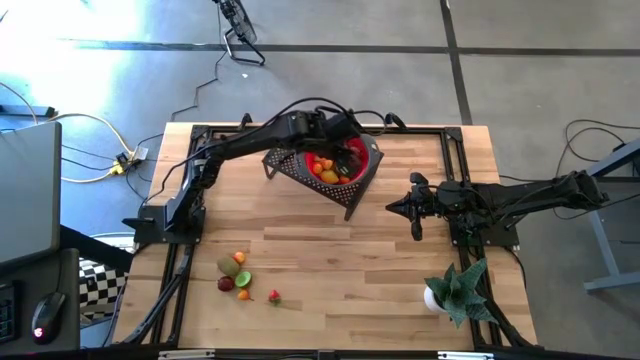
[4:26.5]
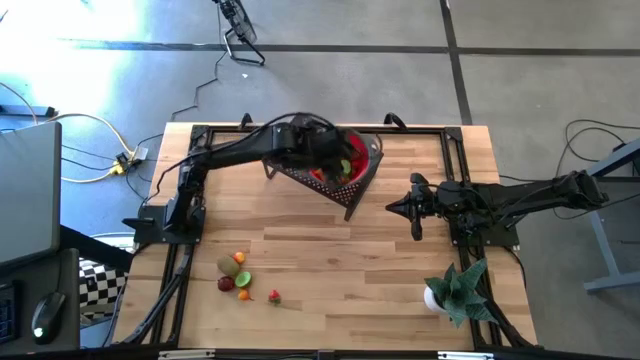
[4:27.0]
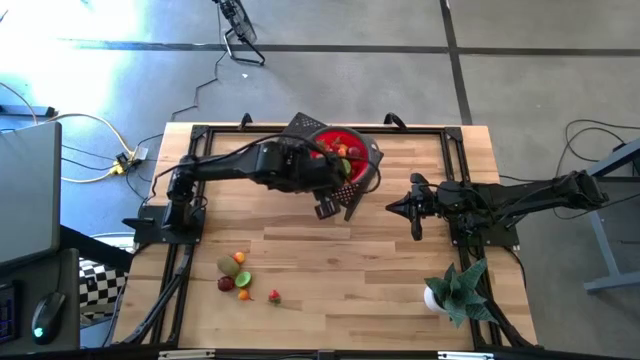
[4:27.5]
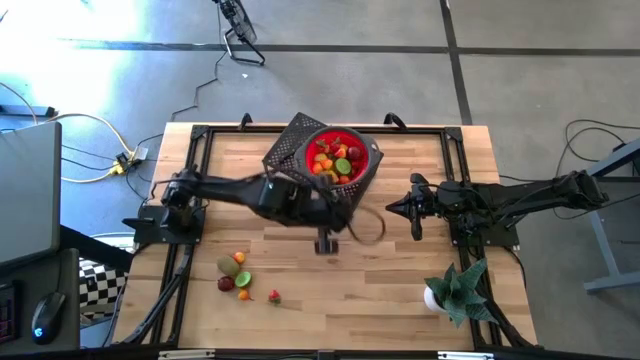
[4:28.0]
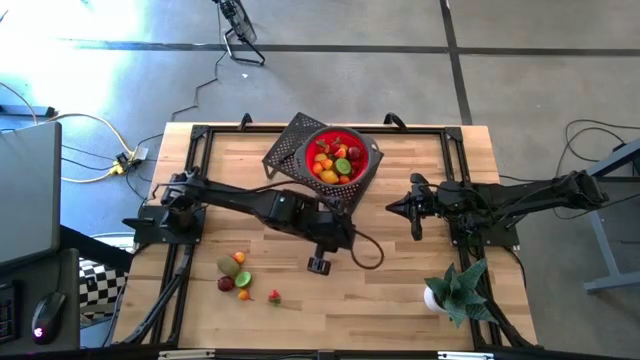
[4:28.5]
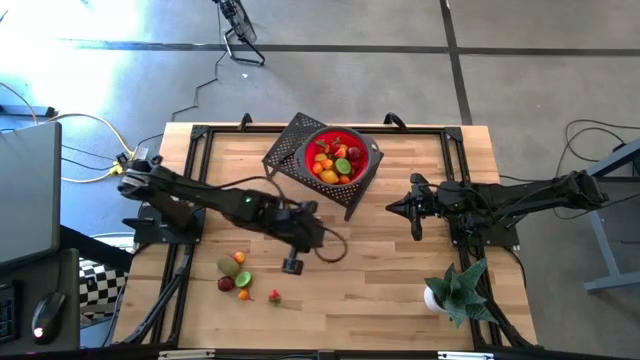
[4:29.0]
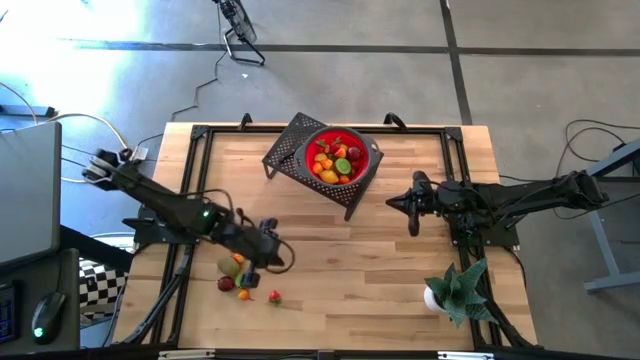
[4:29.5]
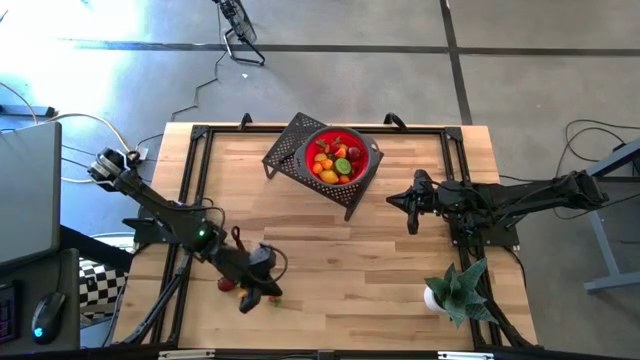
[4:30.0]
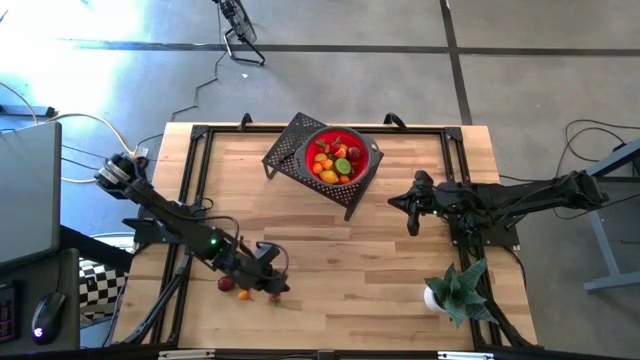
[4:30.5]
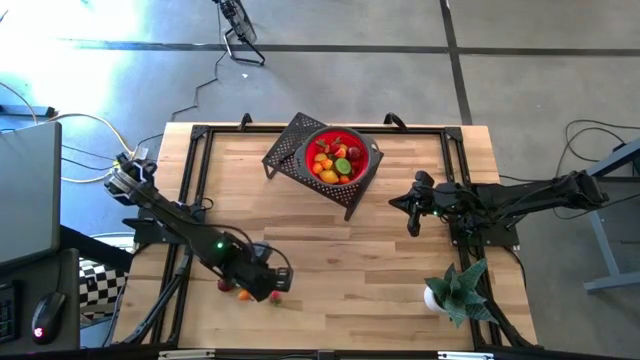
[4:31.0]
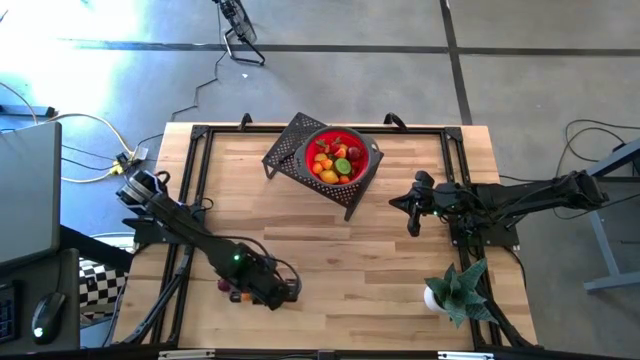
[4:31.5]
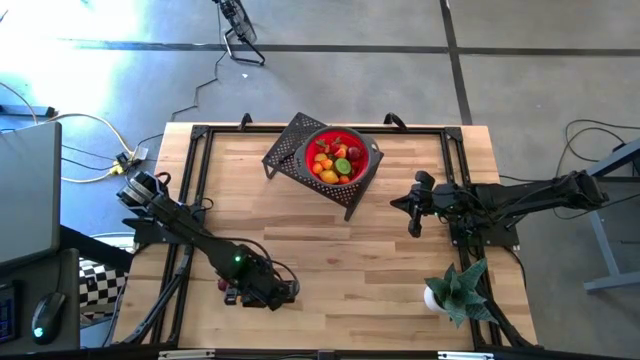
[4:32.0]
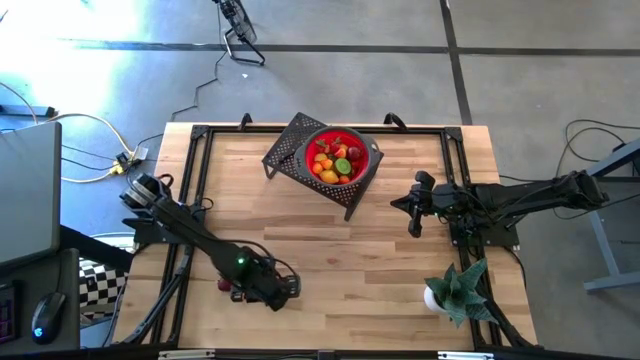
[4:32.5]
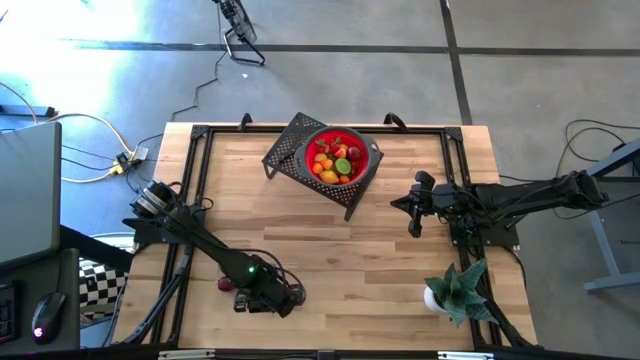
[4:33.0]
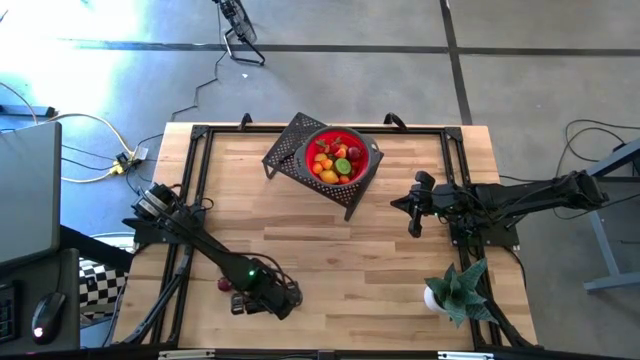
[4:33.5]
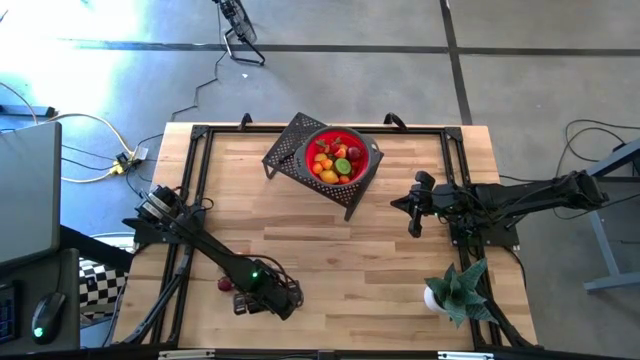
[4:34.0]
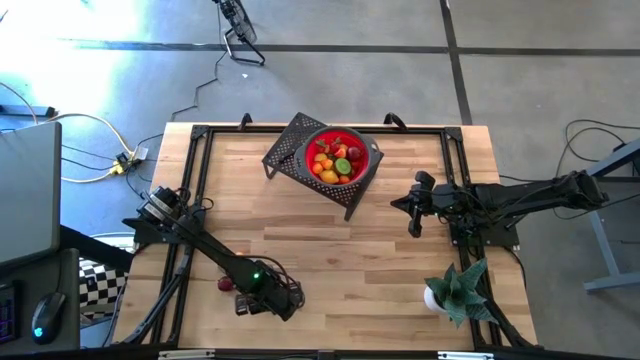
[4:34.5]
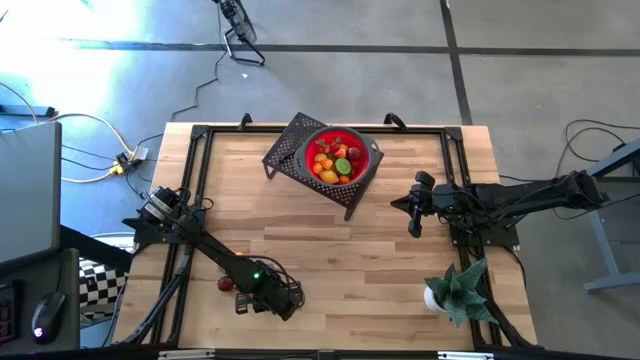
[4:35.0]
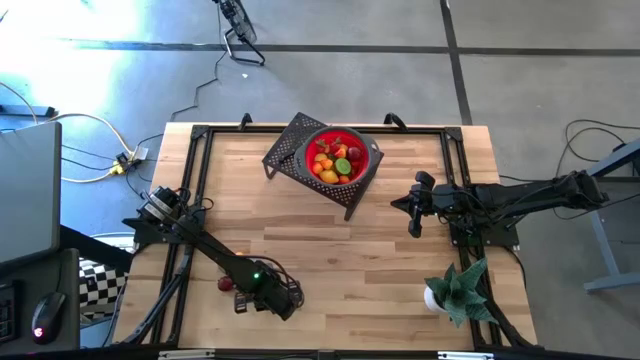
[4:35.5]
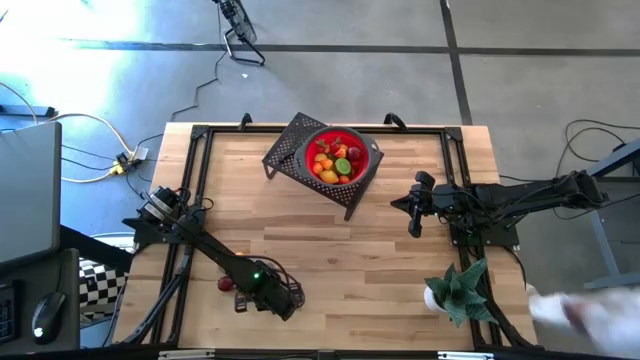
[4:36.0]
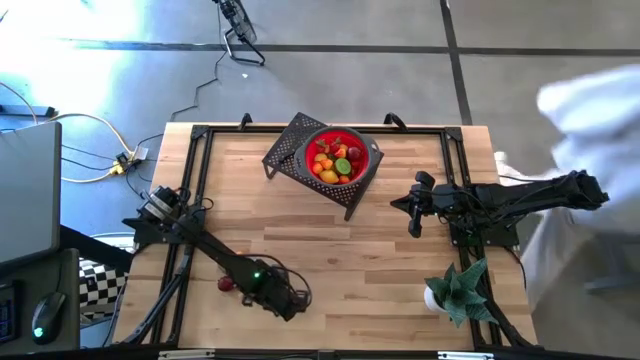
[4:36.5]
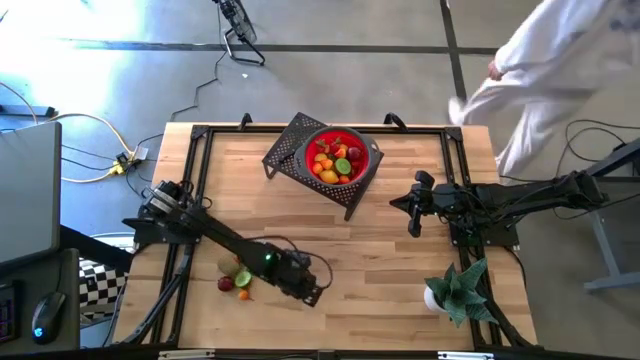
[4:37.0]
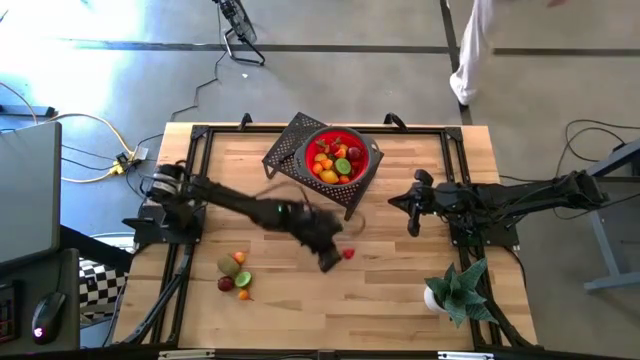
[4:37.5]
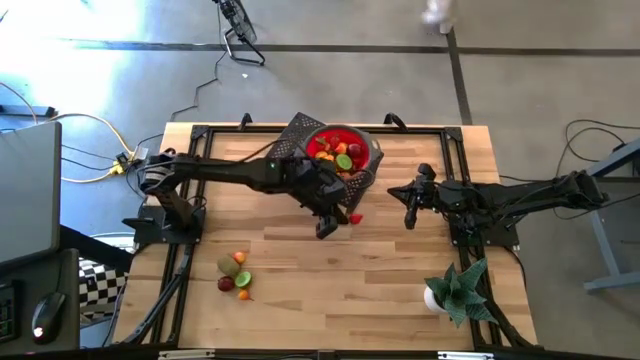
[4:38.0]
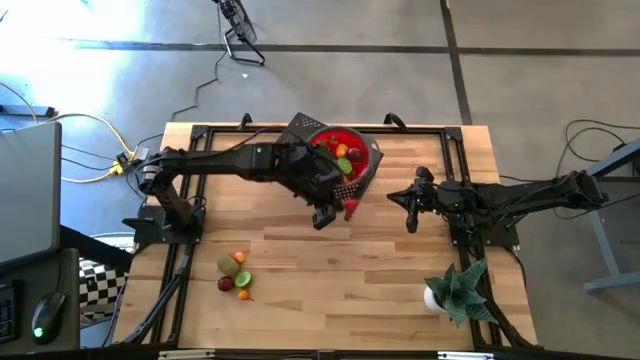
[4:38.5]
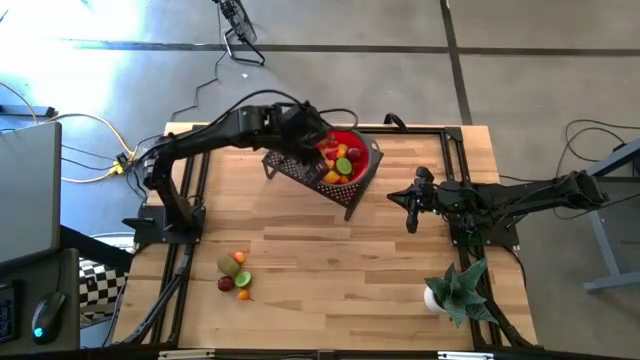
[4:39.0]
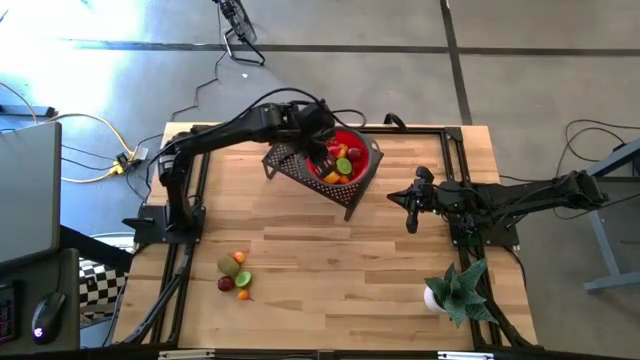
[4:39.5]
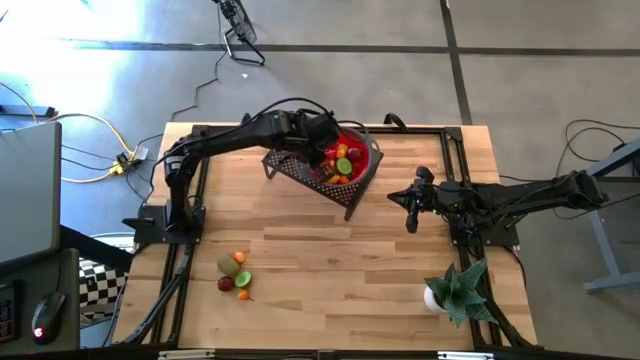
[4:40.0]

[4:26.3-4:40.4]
Task: Pick & Place Fruit
Put the strawberry into the strainer bowl on the shelf

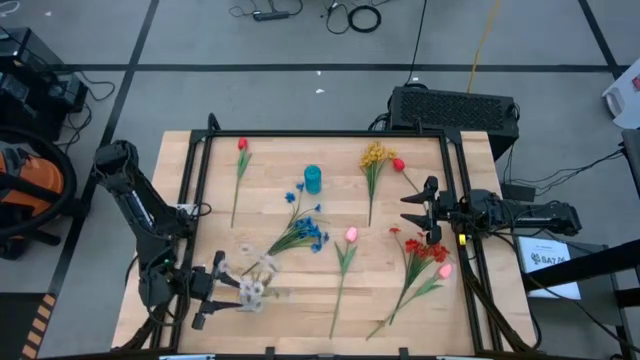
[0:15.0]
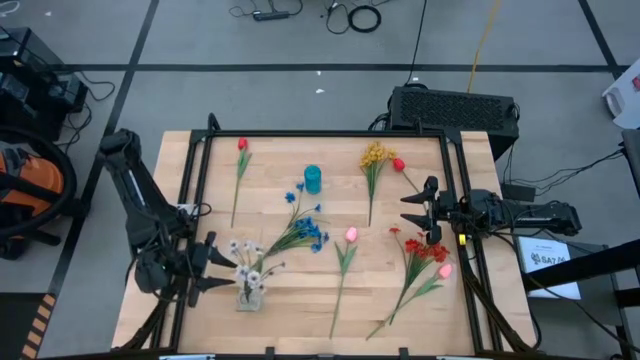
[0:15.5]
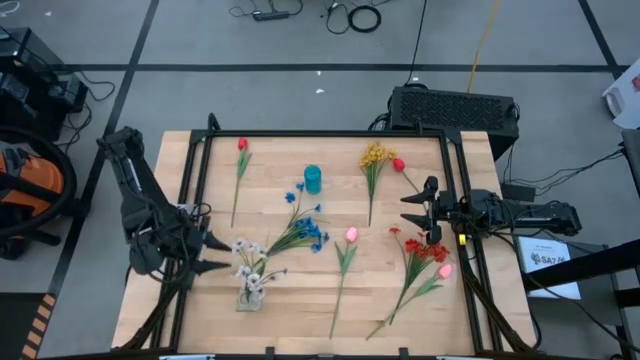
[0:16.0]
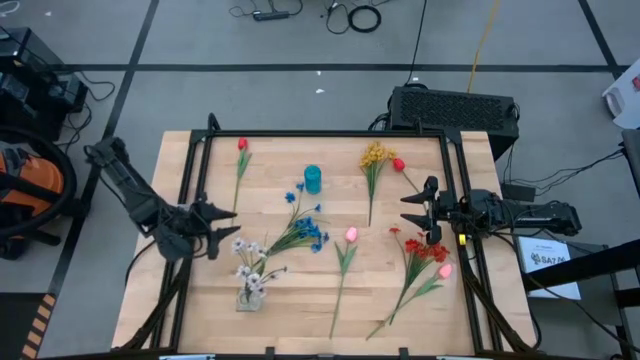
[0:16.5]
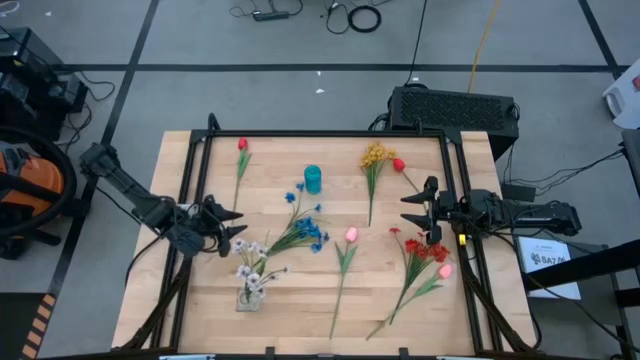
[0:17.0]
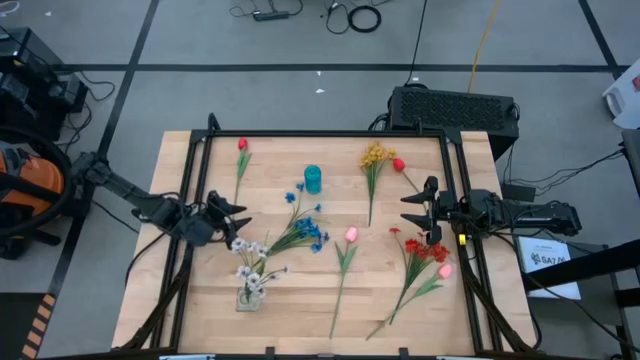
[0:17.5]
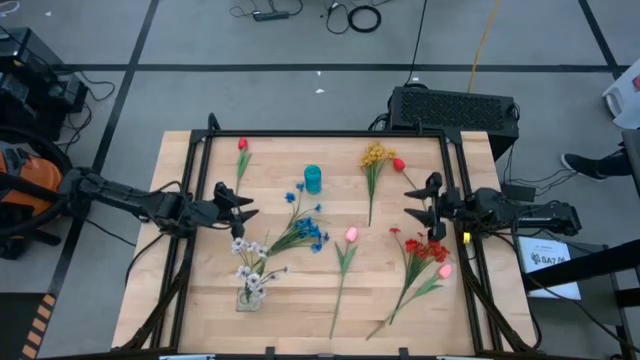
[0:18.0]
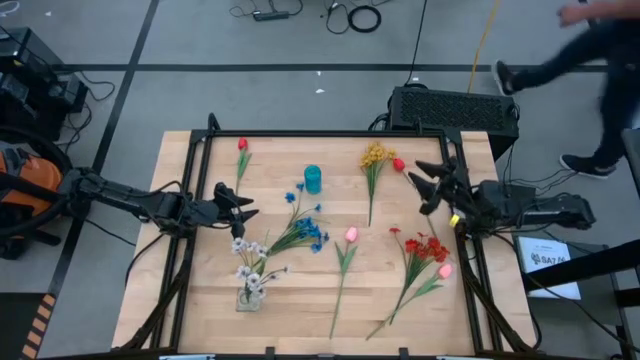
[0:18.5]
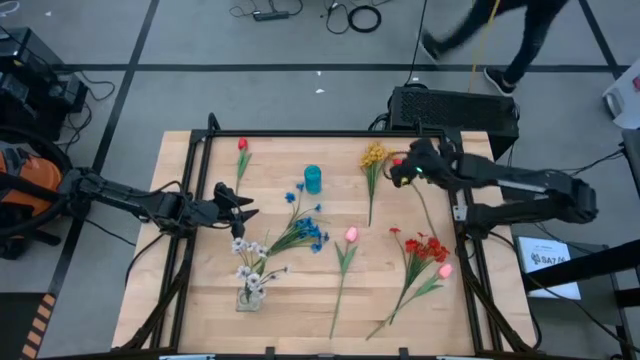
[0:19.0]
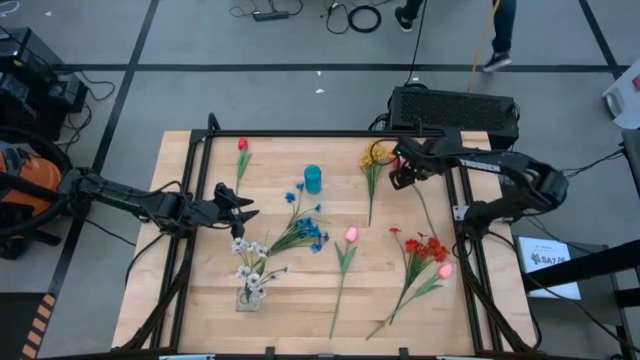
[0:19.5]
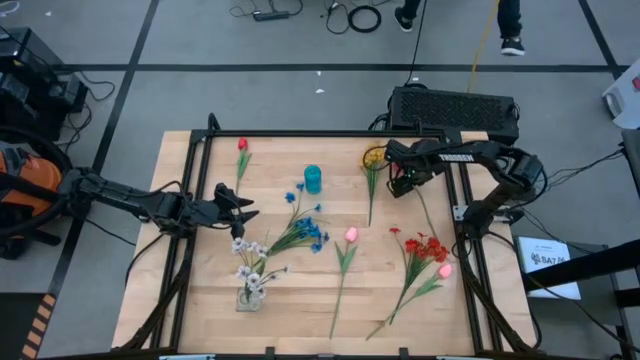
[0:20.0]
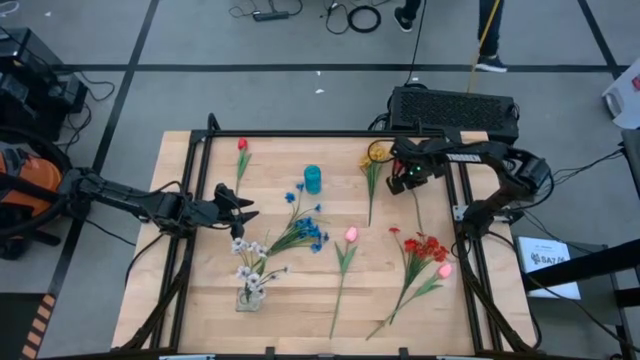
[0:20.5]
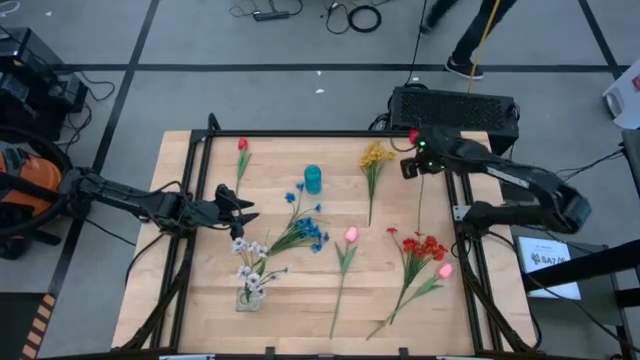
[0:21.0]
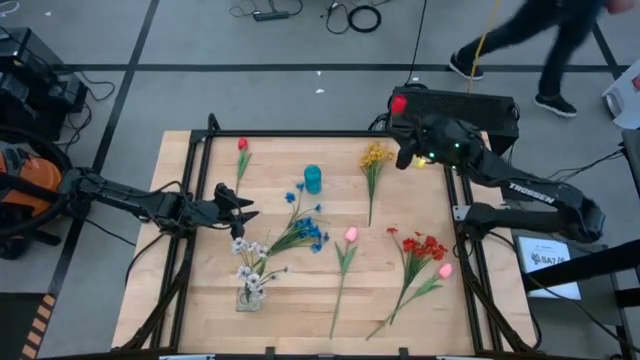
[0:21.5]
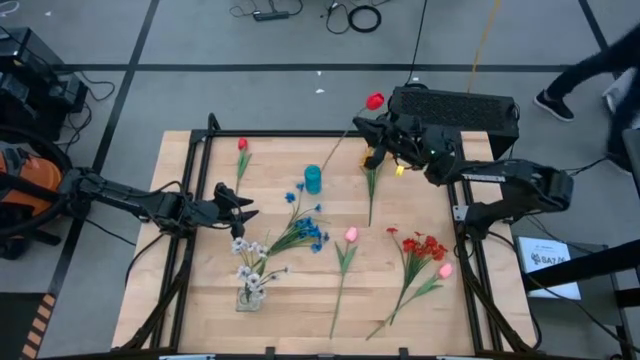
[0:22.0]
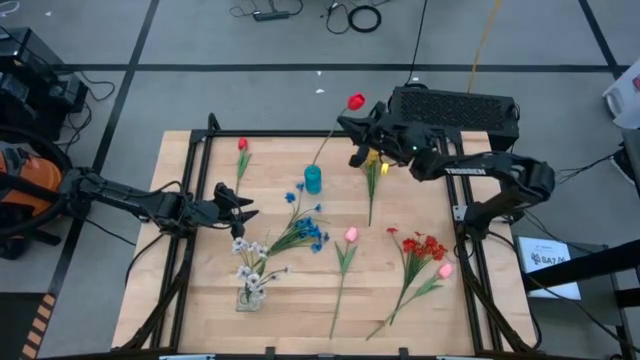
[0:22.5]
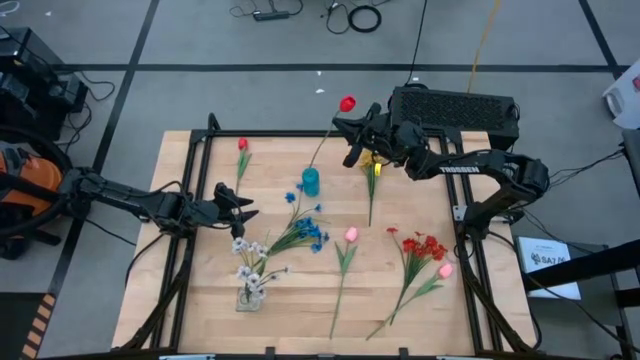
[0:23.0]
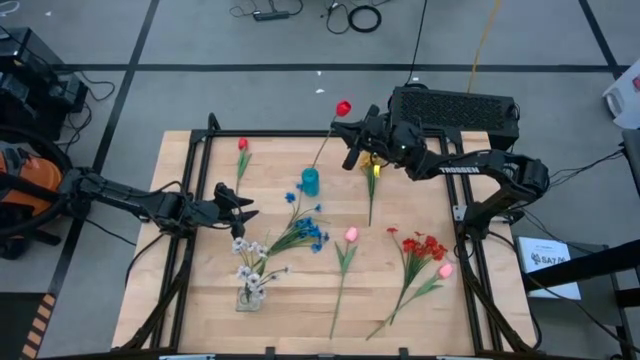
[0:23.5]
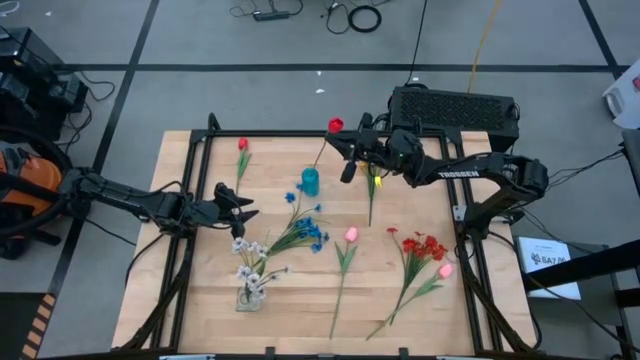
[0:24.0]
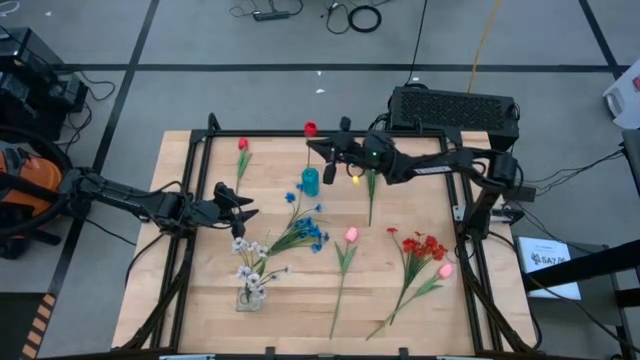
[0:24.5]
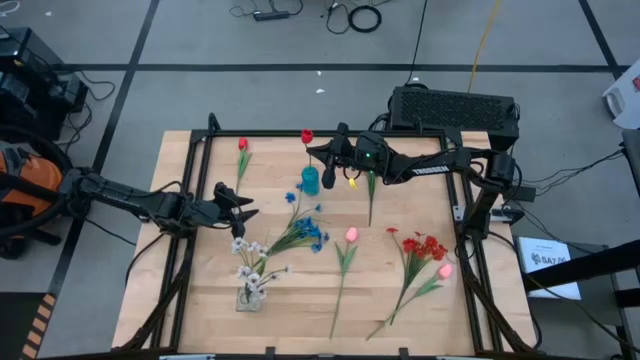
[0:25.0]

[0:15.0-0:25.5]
Task: Sort flowers into vase by color
Put the right red tulip into the blue flower vase
